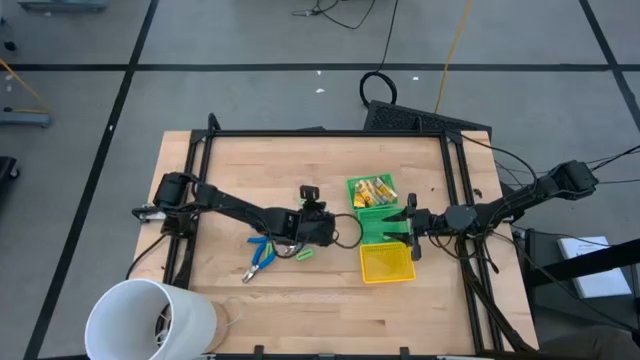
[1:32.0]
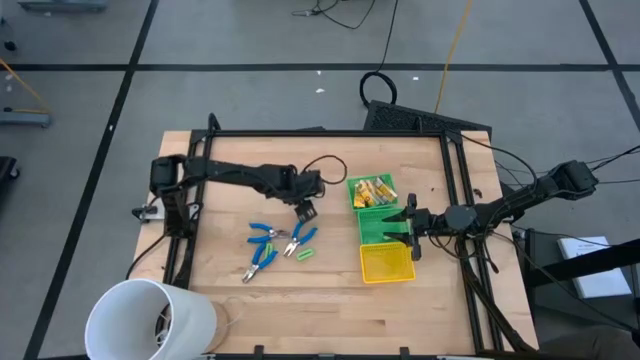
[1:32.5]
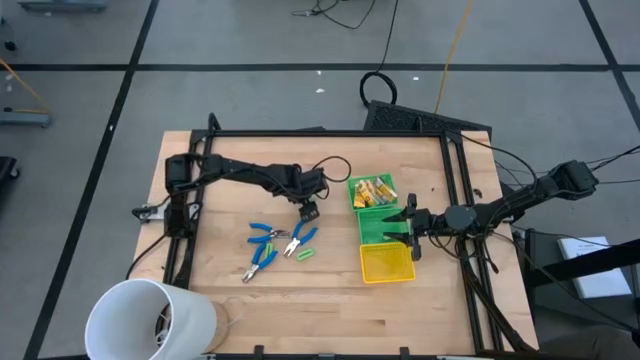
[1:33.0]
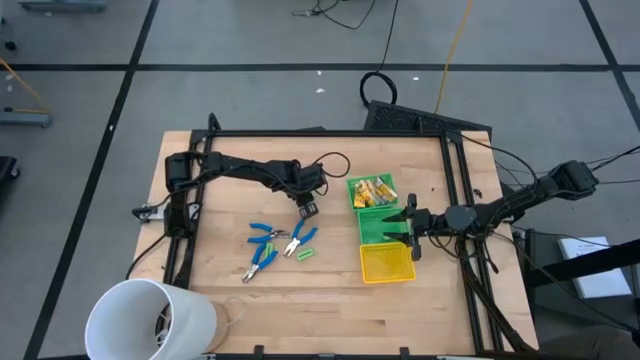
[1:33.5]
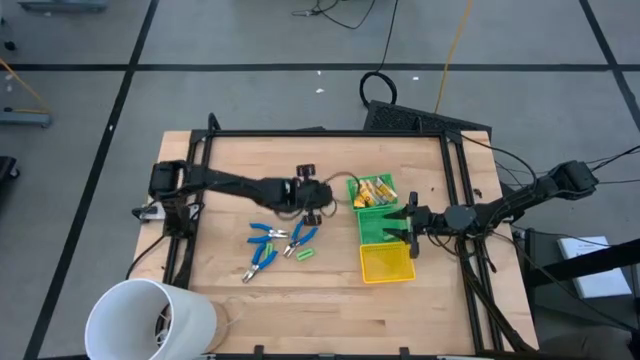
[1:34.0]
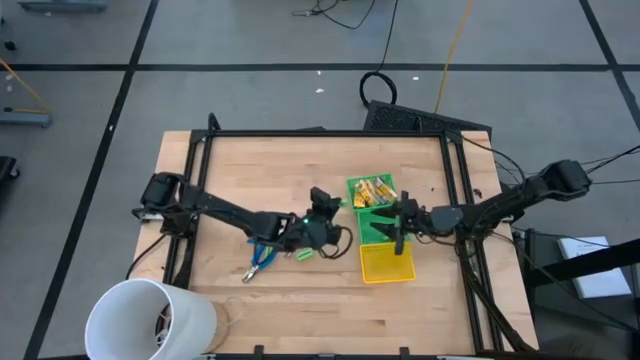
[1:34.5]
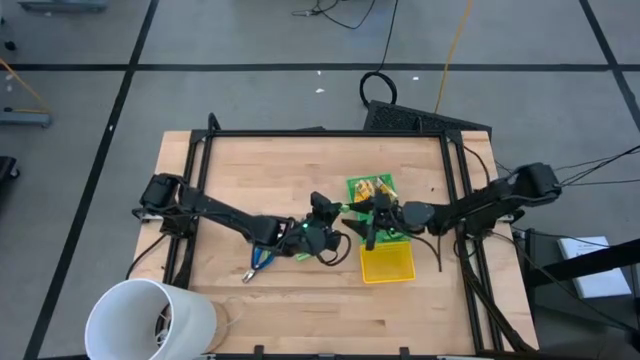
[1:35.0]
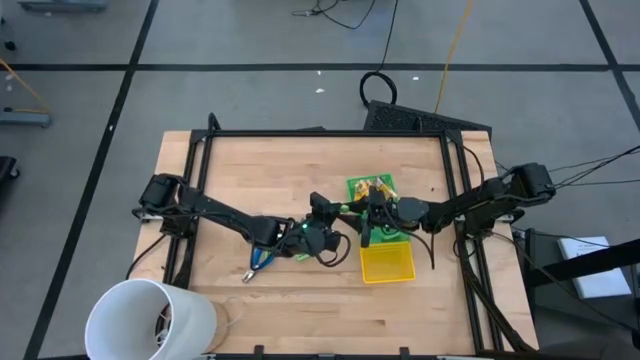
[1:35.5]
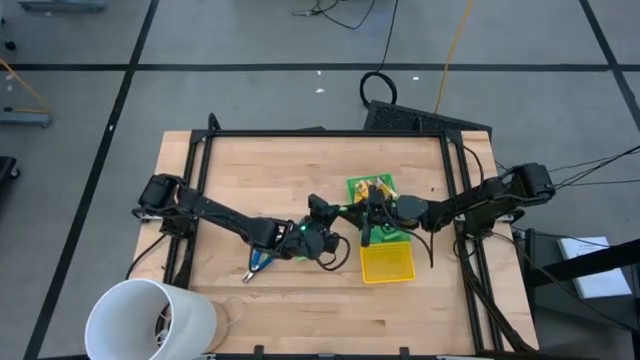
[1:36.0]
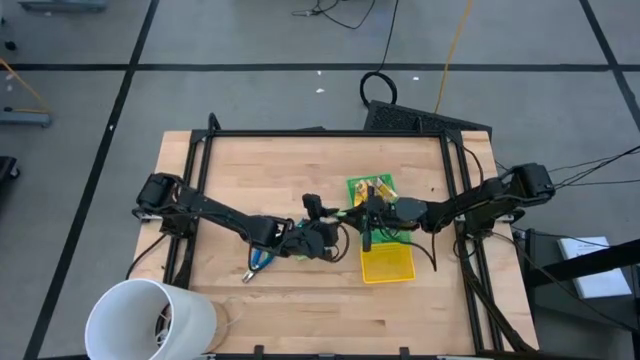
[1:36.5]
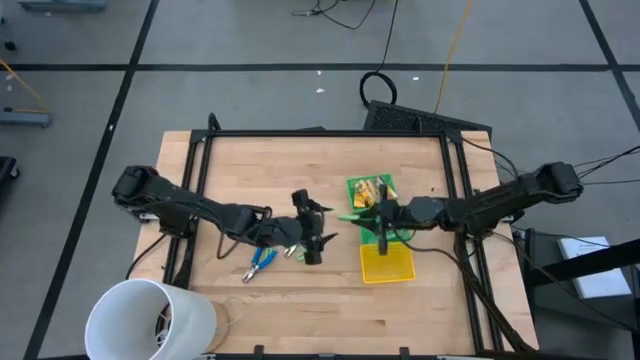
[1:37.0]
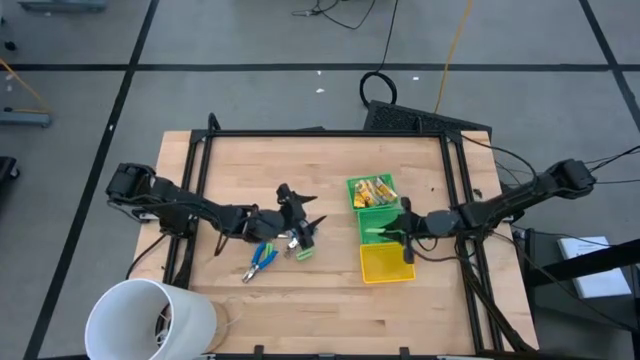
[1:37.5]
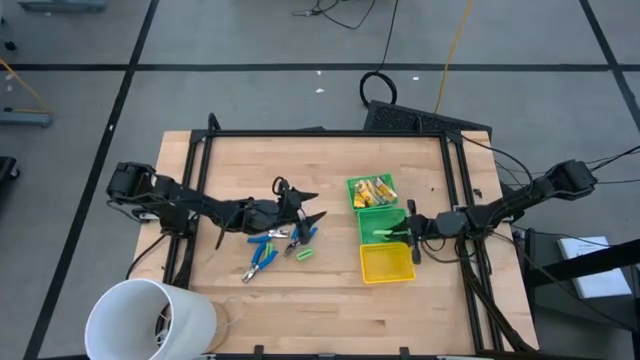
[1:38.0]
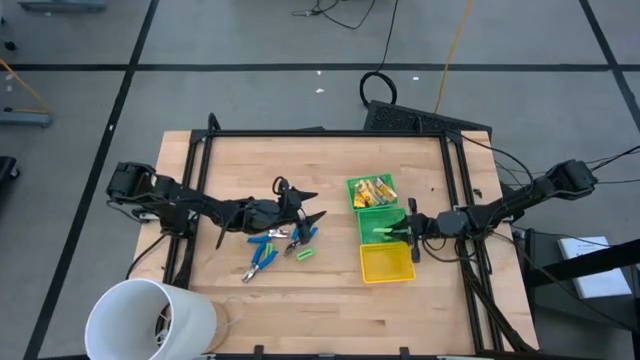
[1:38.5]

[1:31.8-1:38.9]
Task: Pick & Place School Supplies
Put the top right green eraser into the bottom green bin

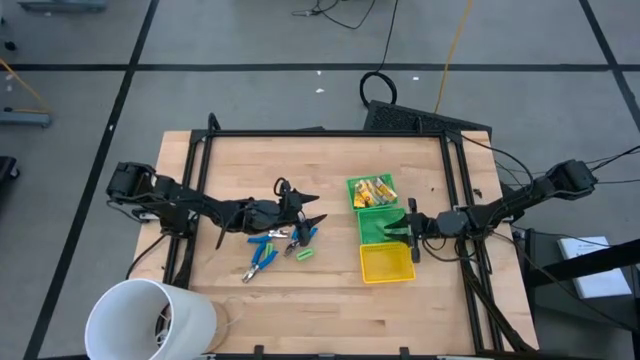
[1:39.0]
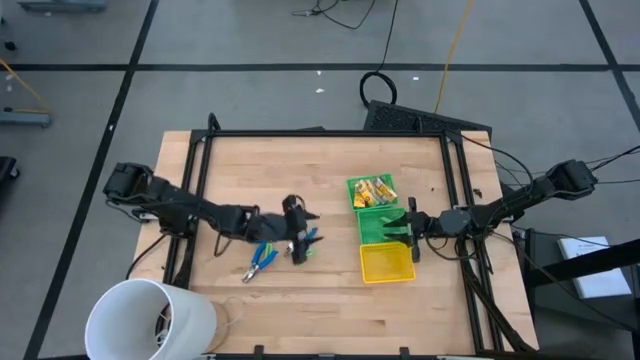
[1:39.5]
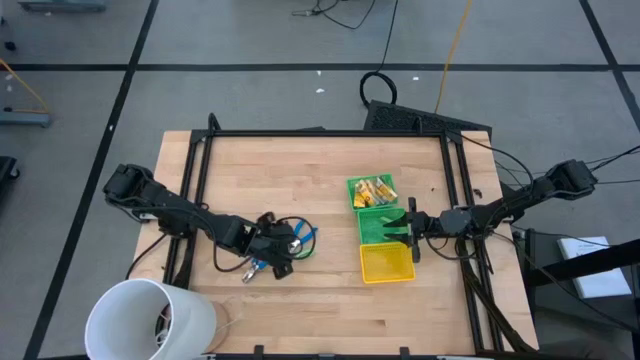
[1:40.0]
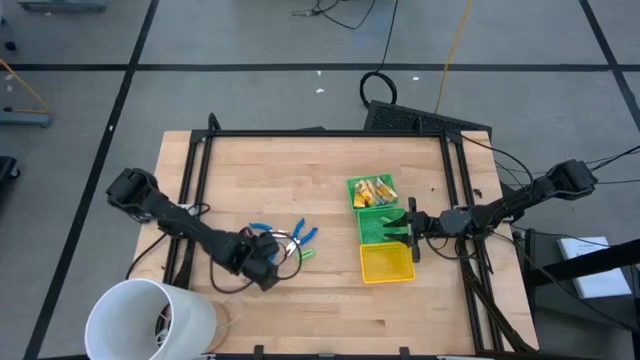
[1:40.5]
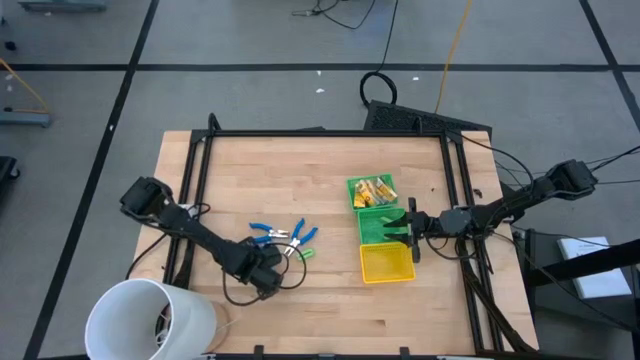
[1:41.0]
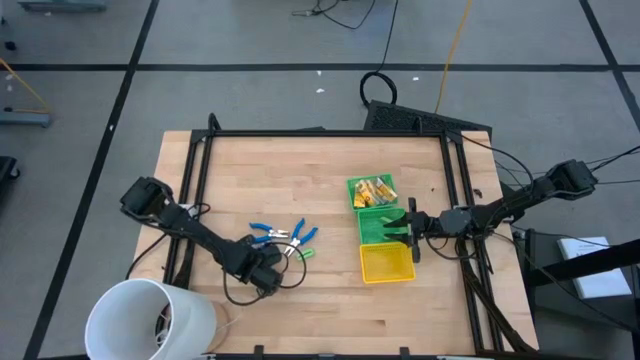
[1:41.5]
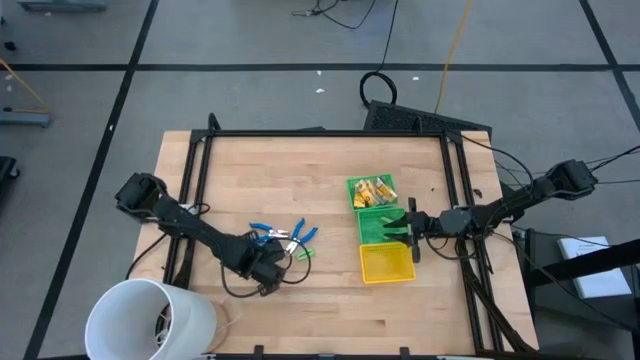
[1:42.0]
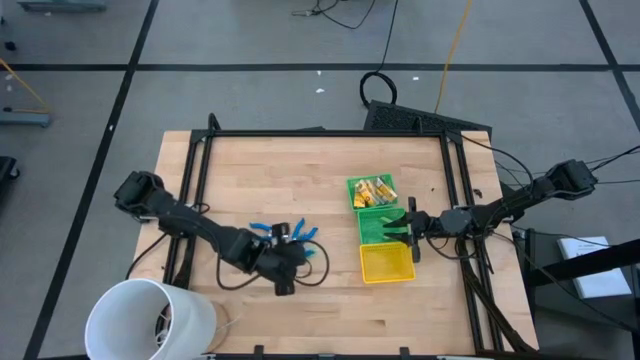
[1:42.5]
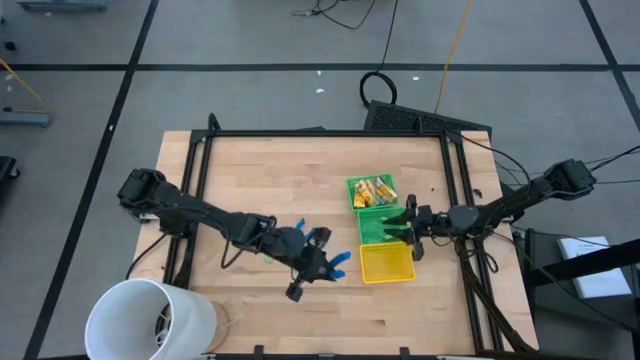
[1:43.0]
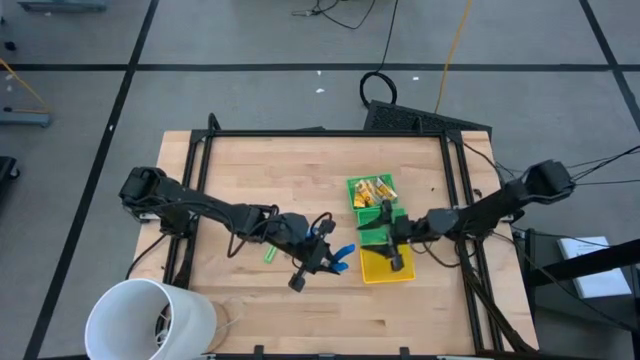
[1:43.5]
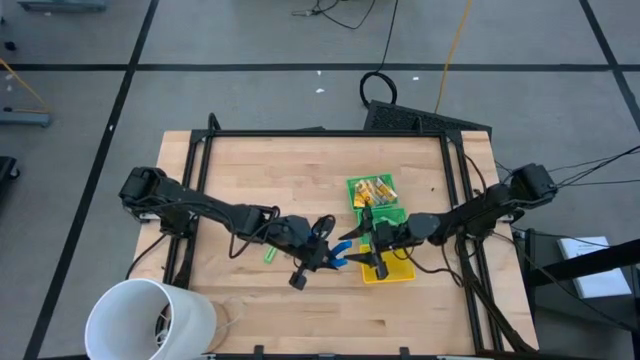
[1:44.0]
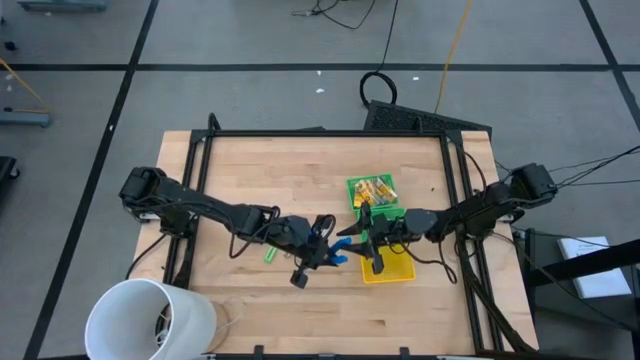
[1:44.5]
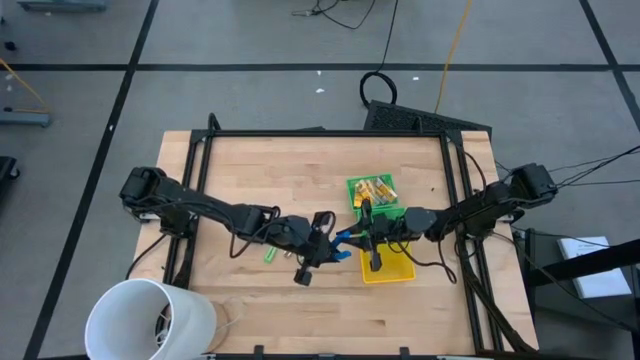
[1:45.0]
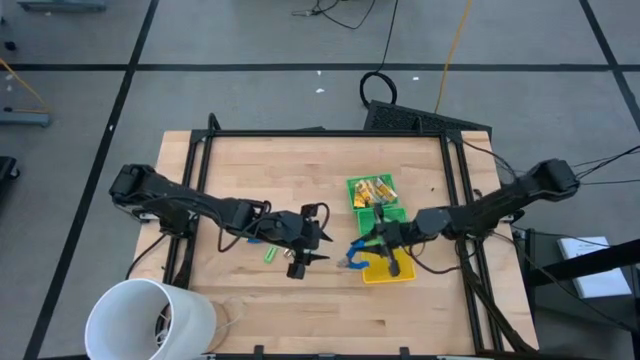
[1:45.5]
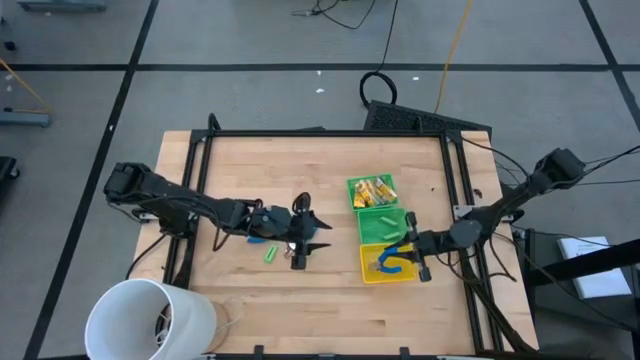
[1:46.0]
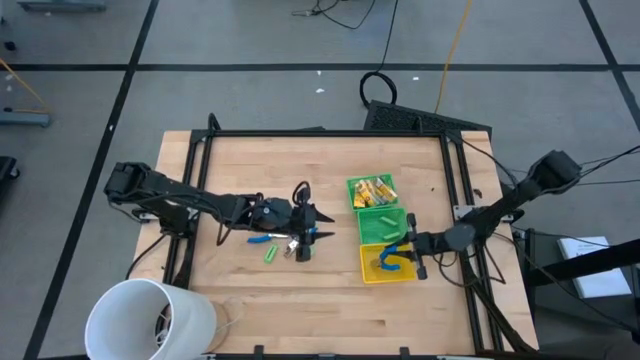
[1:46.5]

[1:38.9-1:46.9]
Put the bottom left blue pliers into the yellow bin

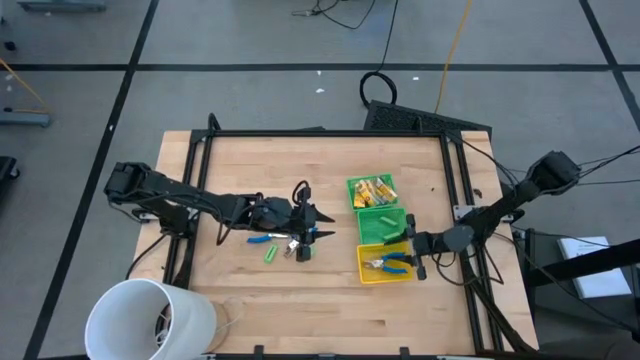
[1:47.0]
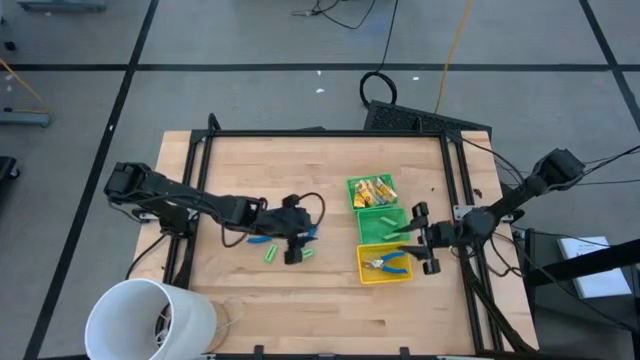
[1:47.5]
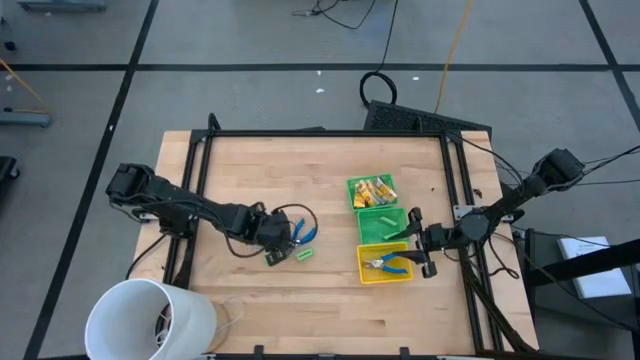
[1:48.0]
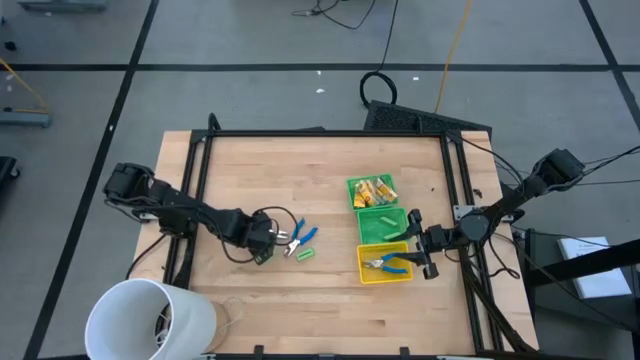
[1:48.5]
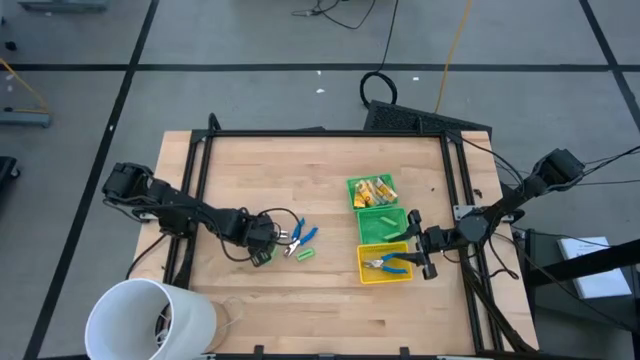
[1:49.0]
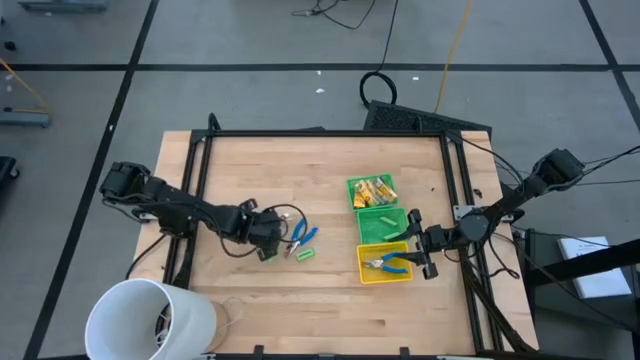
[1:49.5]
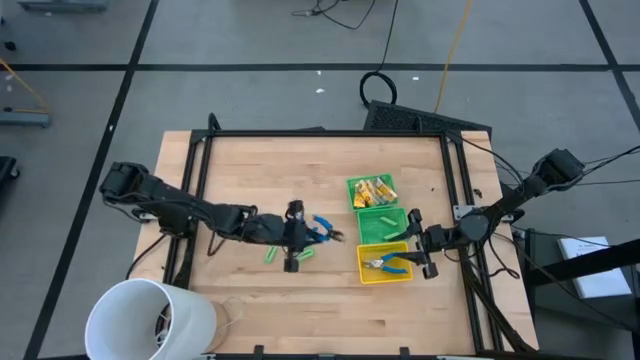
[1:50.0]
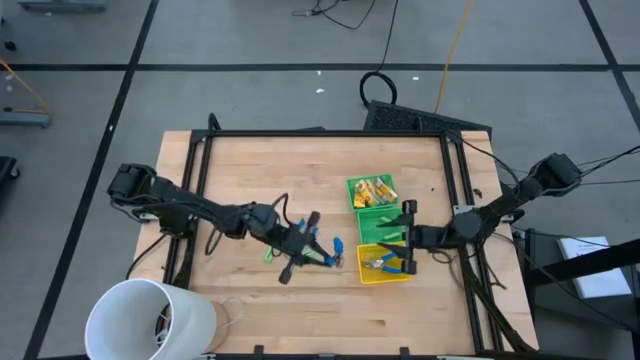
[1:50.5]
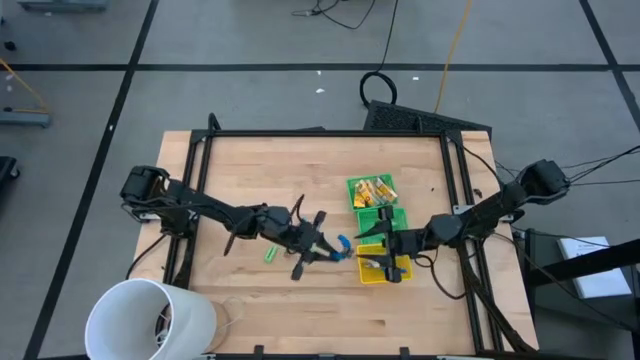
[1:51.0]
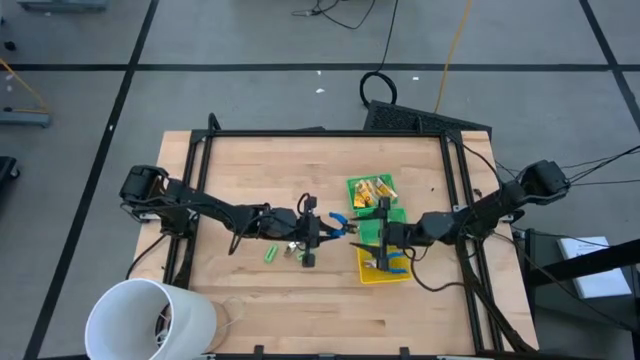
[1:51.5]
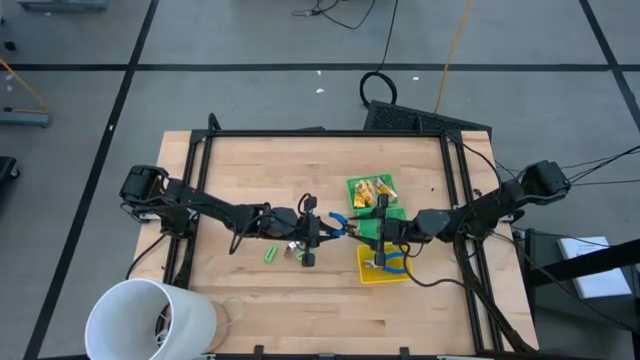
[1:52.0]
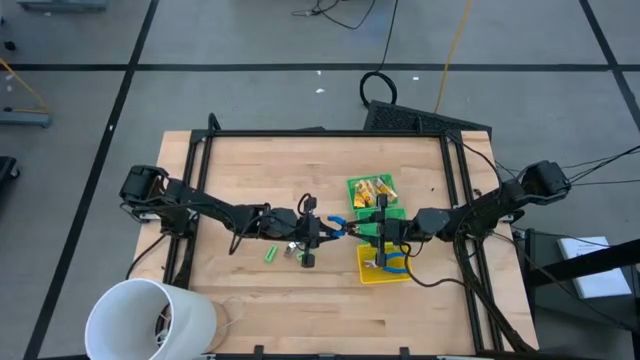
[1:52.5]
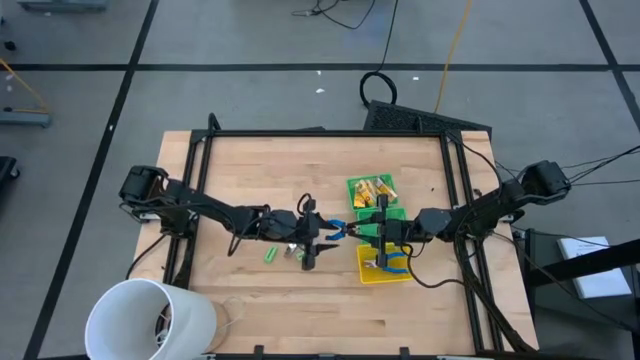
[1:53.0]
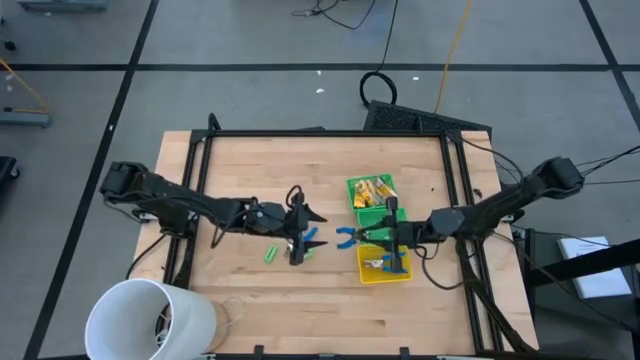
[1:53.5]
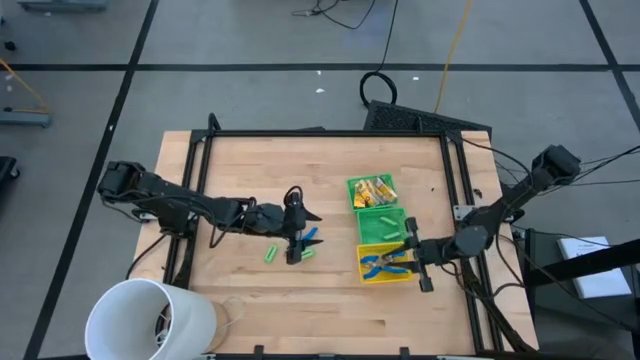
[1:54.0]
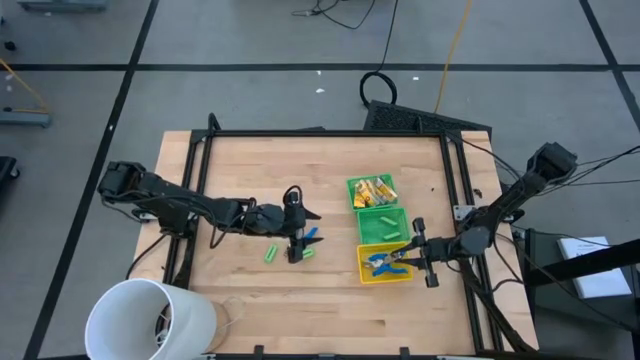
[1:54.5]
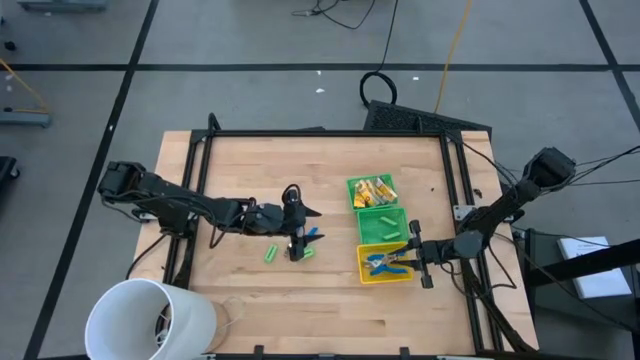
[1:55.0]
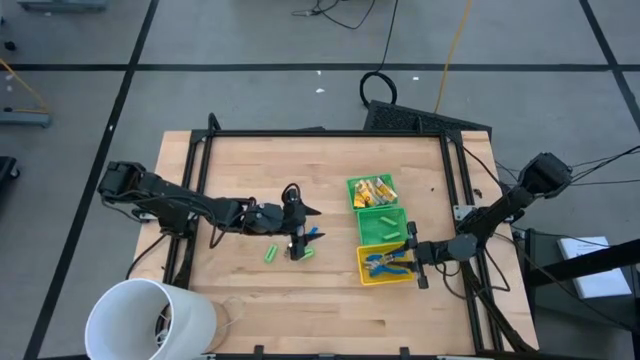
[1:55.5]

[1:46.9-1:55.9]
Put the left blue pliers into the yellow bin
